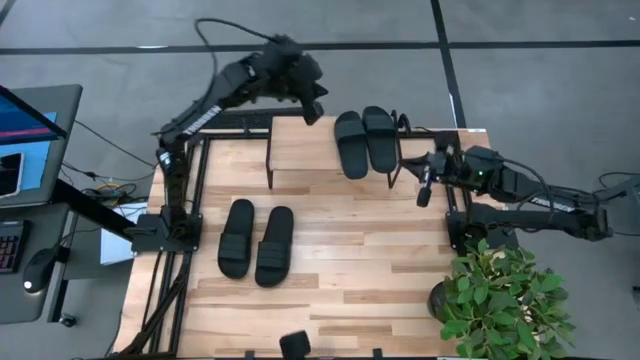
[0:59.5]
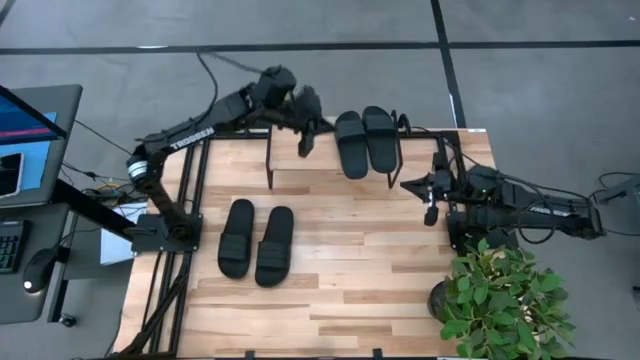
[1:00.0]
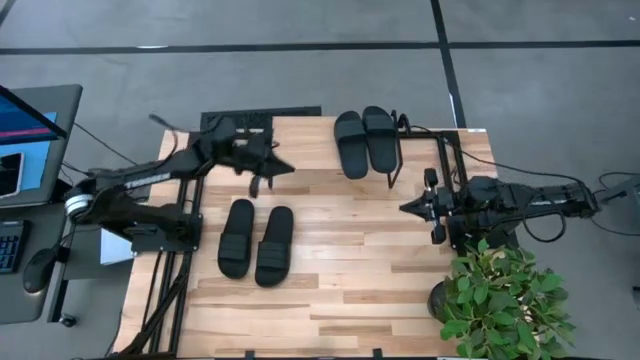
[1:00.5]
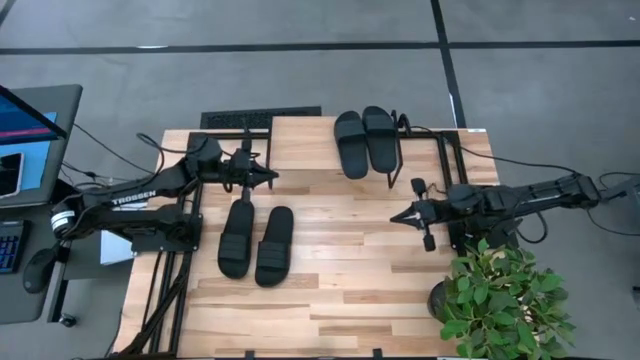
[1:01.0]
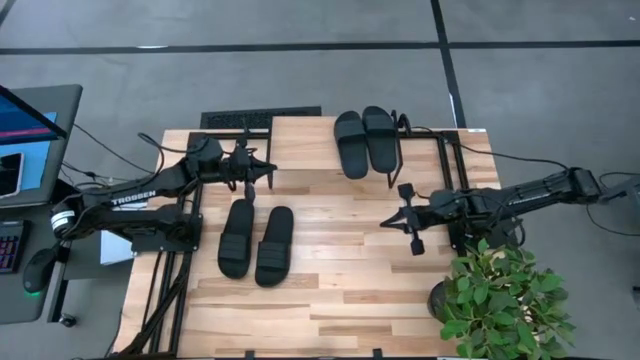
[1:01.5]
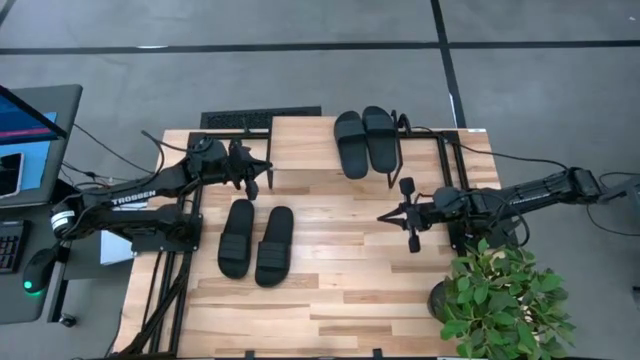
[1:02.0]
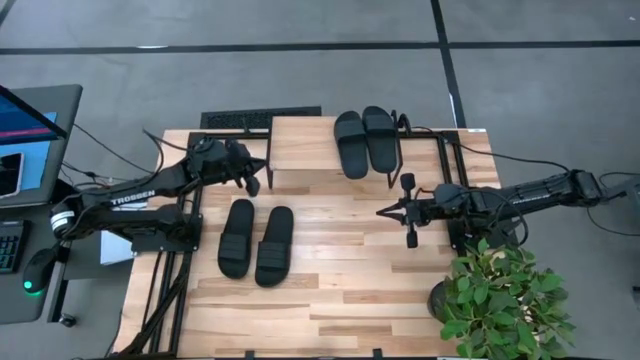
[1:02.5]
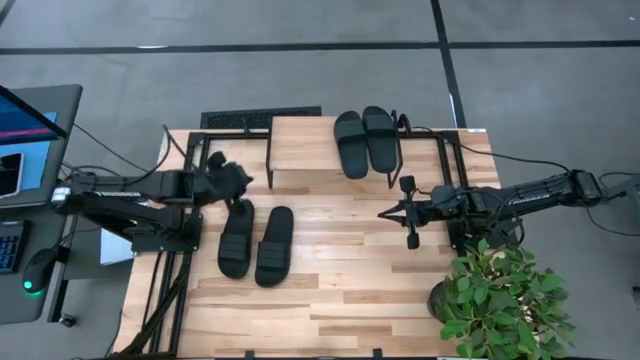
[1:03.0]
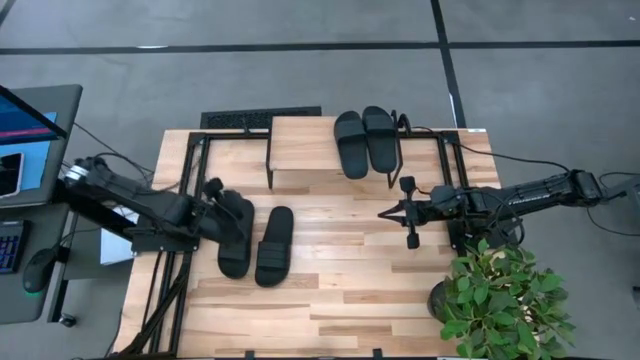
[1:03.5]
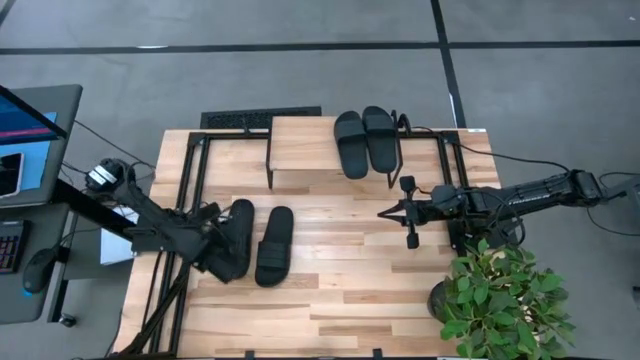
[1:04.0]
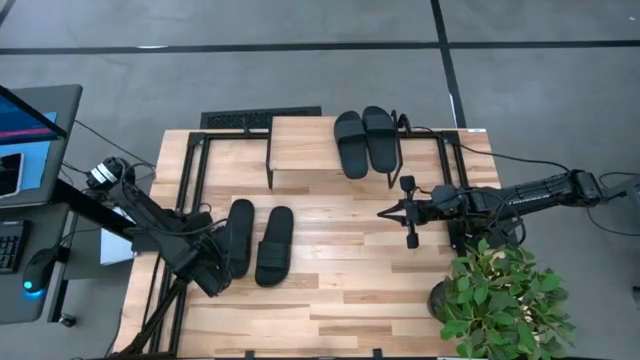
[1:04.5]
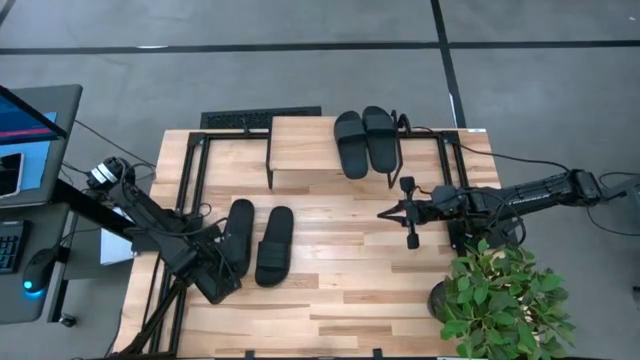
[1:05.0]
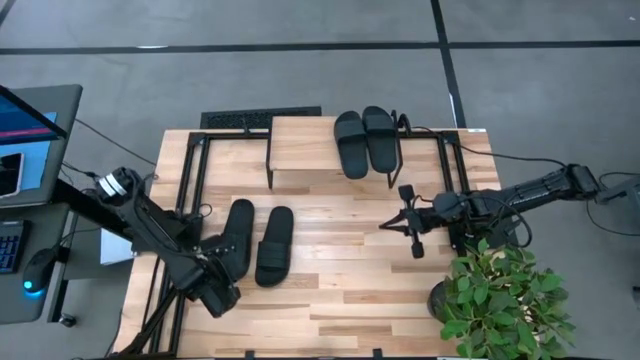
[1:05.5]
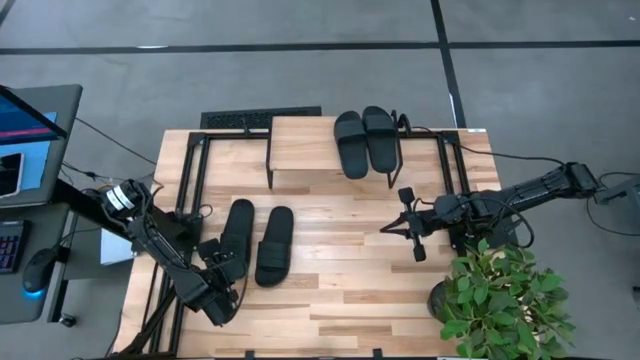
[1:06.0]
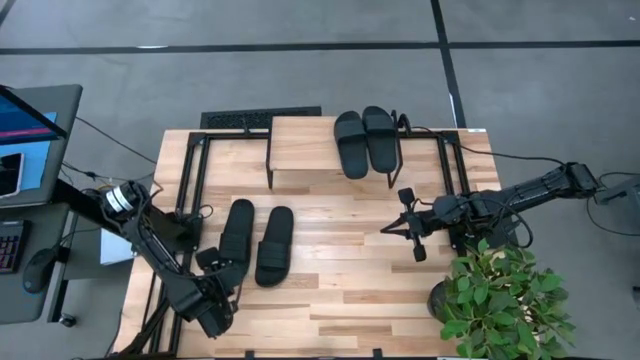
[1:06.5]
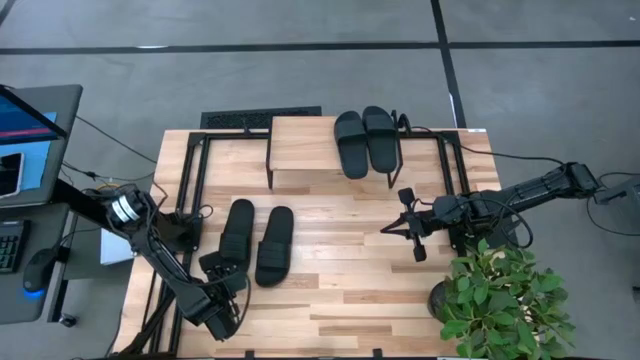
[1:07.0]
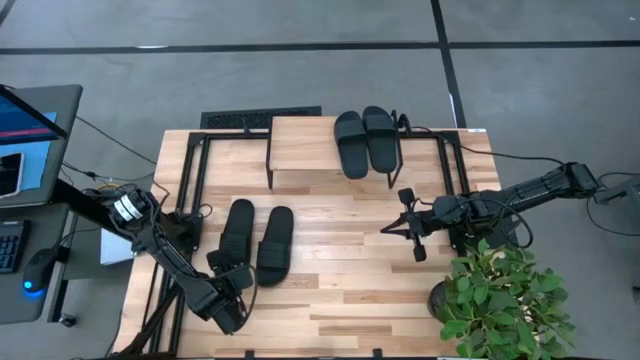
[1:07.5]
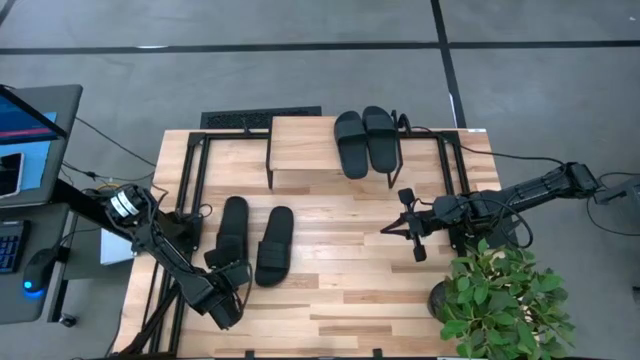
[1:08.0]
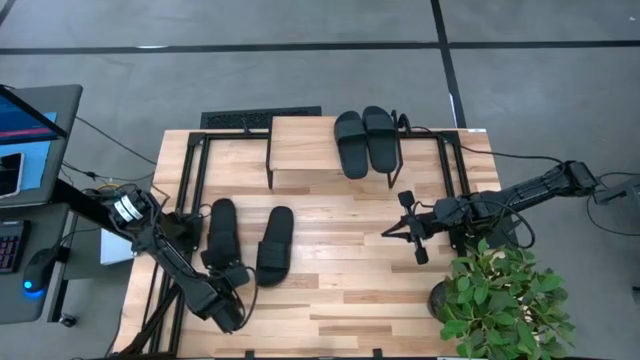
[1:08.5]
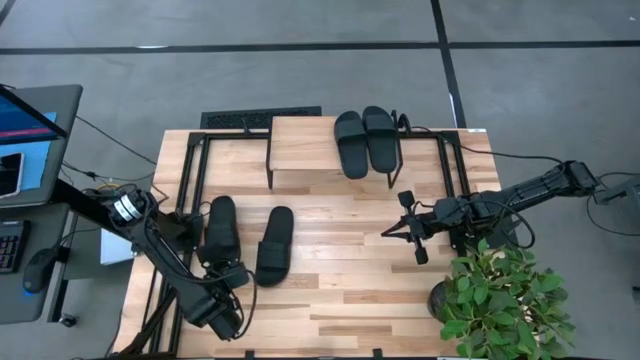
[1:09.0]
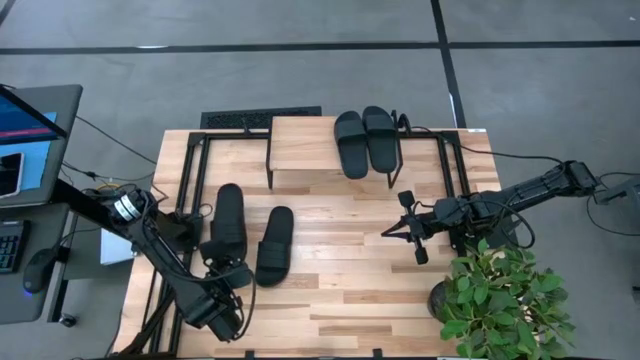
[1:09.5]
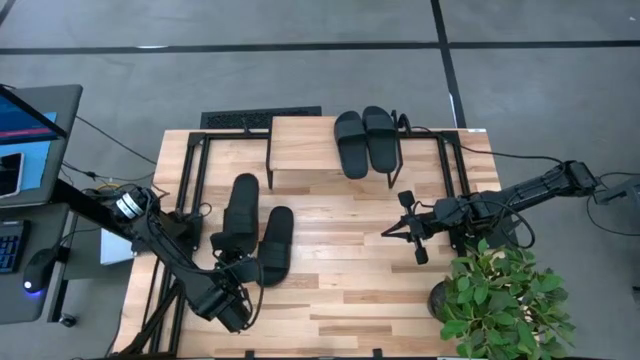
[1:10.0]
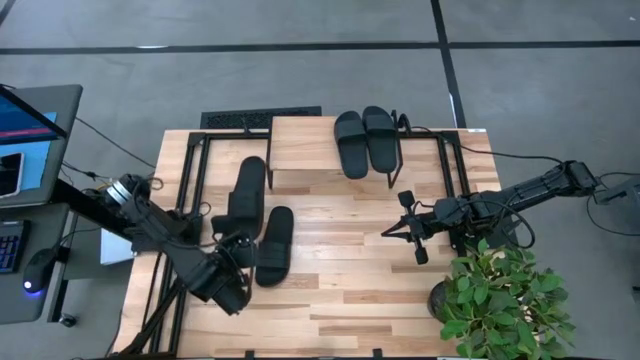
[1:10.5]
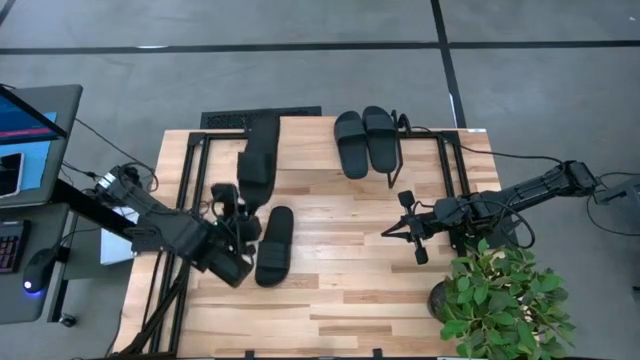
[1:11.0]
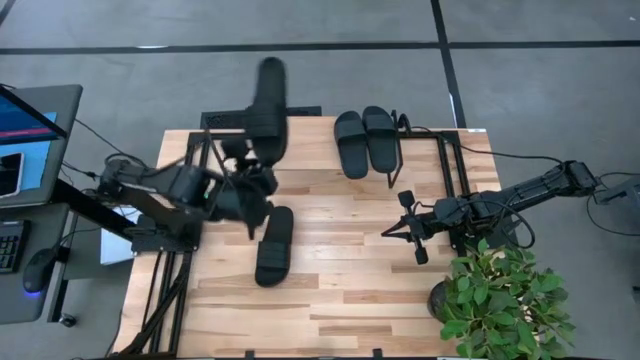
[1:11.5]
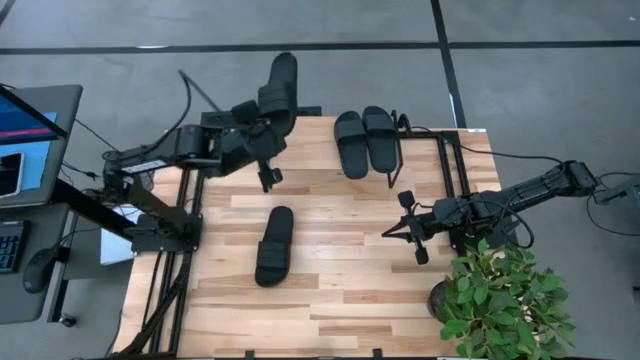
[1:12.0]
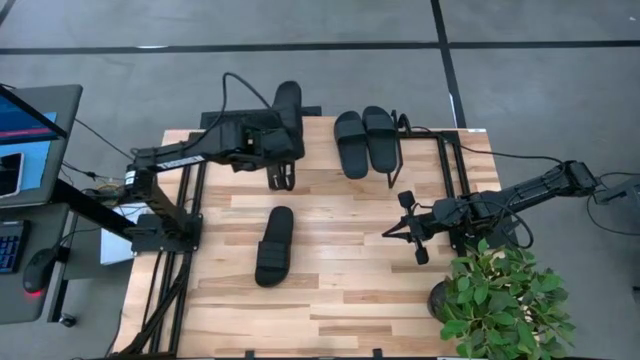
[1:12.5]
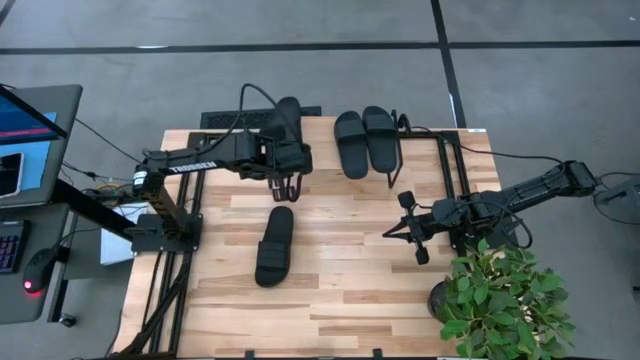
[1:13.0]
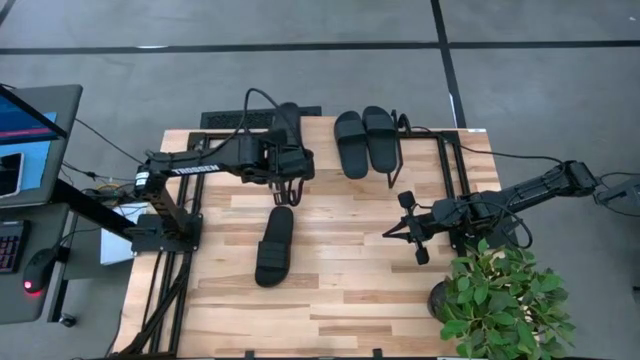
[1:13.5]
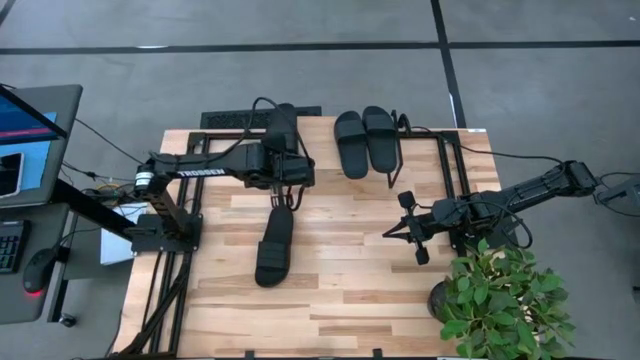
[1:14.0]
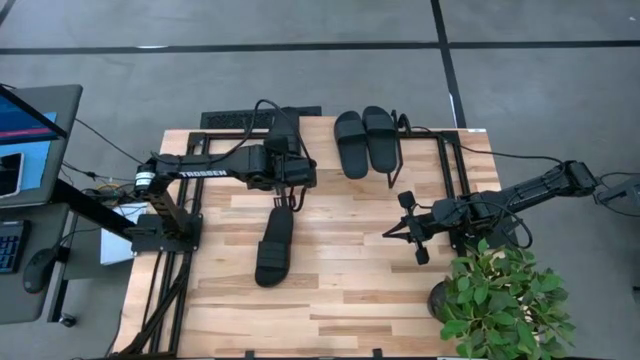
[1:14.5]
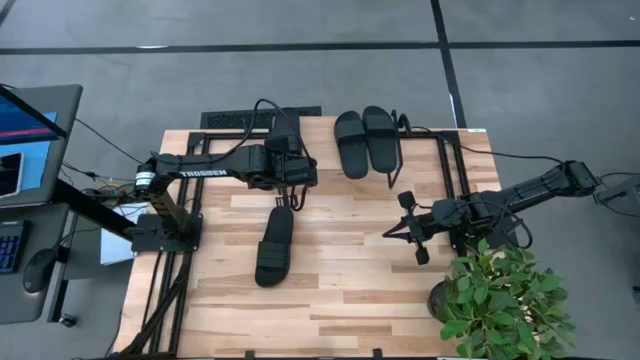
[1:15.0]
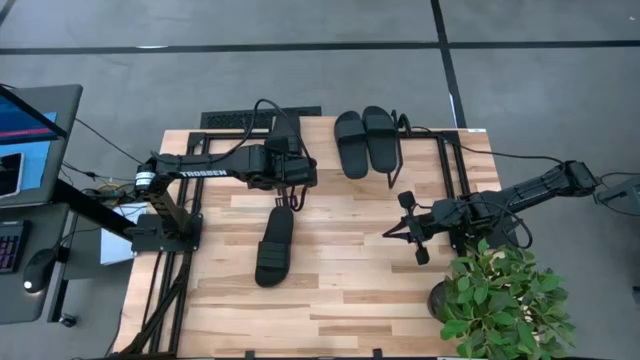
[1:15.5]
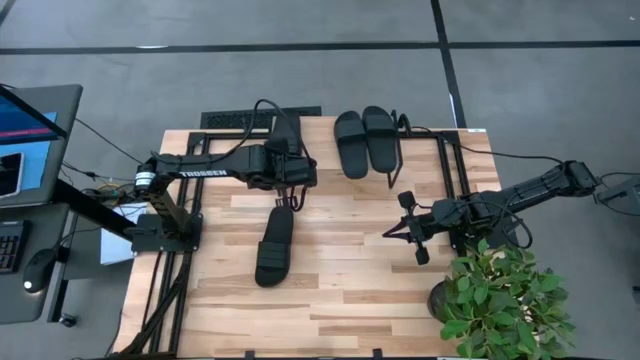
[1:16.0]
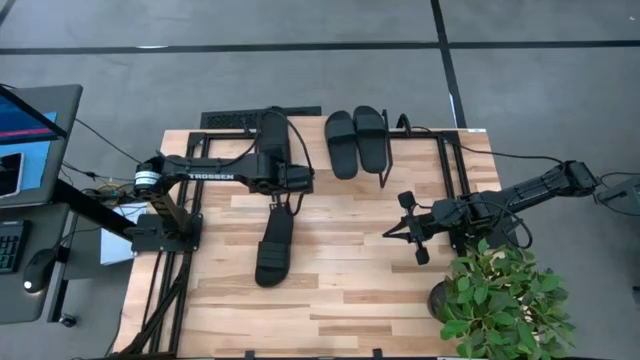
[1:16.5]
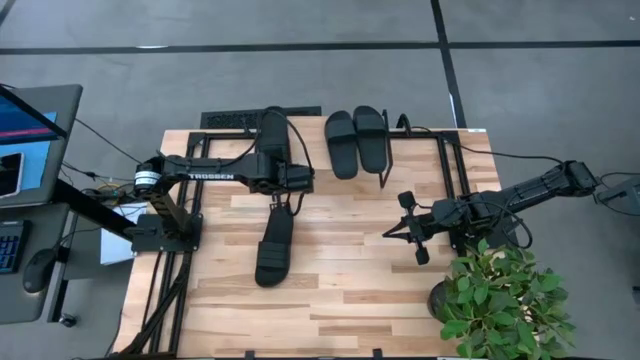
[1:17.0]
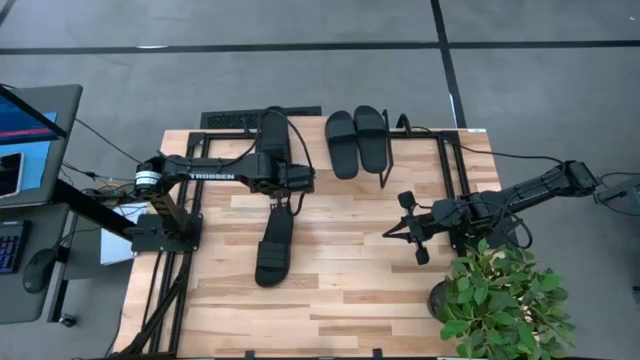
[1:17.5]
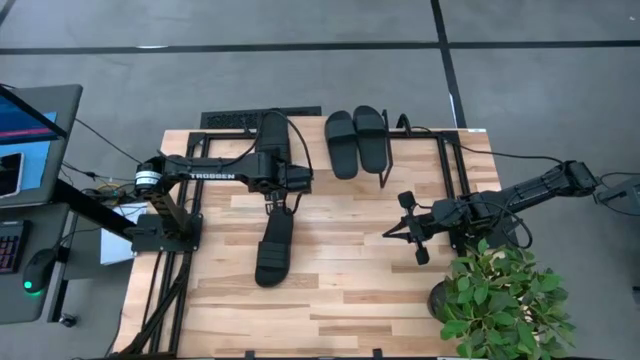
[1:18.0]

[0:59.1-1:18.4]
Task: Pick and place slides into the shelf
Put the left black slide on the shelf

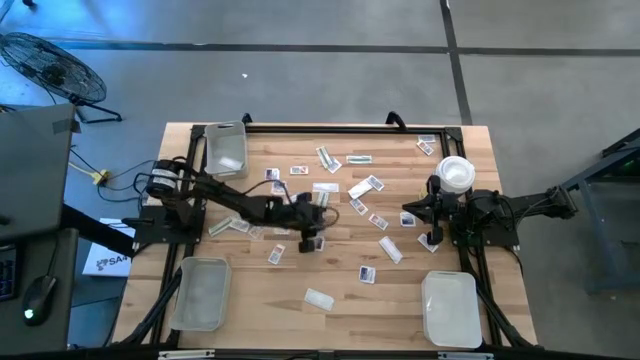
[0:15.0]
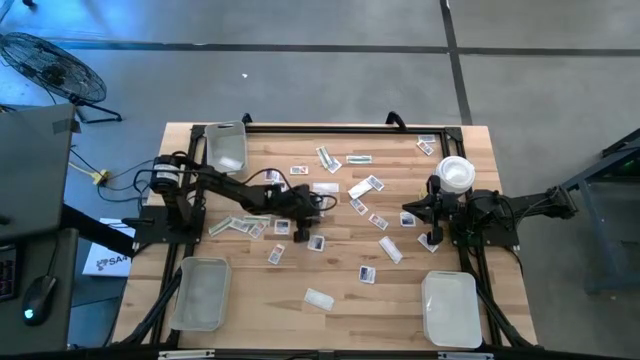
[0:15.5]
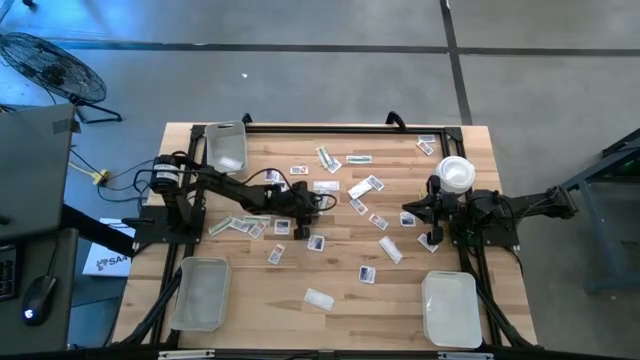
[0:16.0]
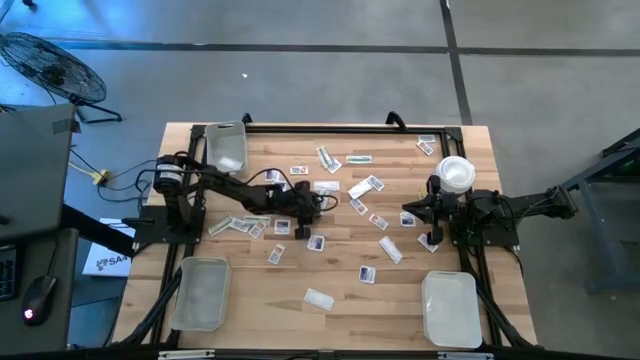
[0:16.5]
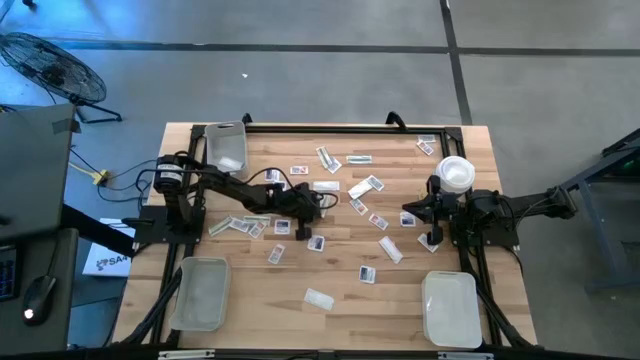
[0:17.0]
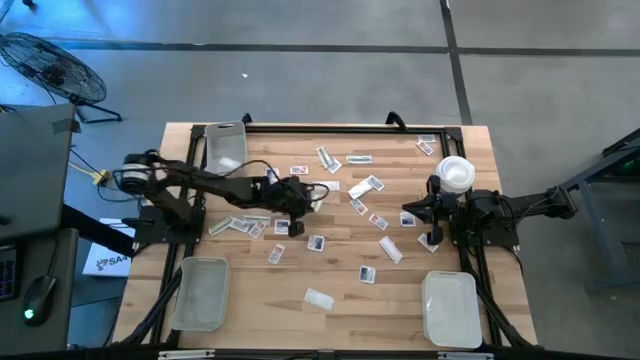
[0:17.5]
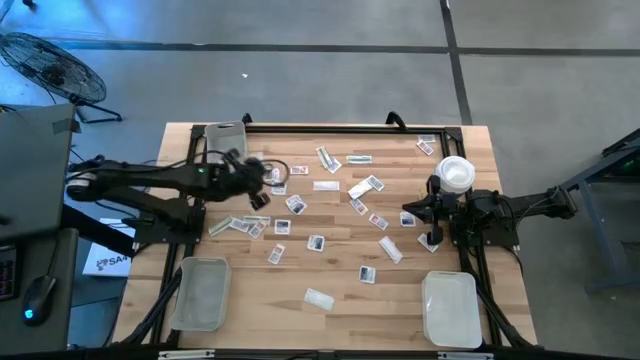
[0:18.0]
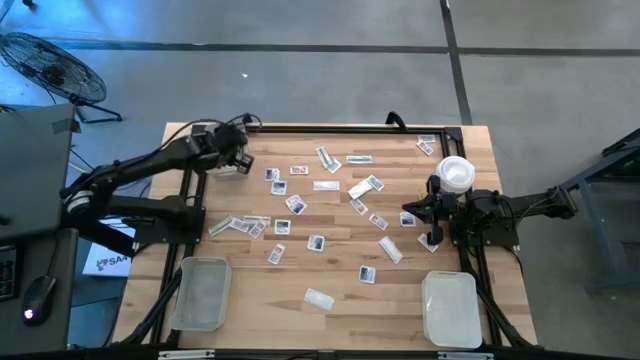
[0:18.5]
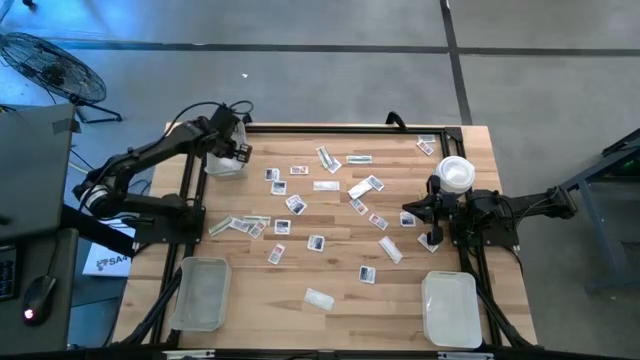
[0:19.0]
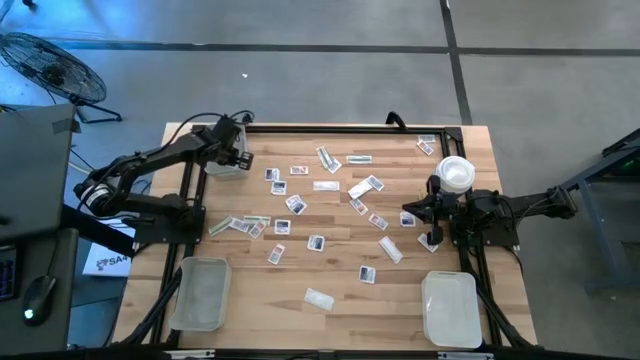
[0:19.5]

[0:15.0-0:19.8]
Task: Pick & Place First Aid Supplies
Put the green bandage pack into the top gray bin
